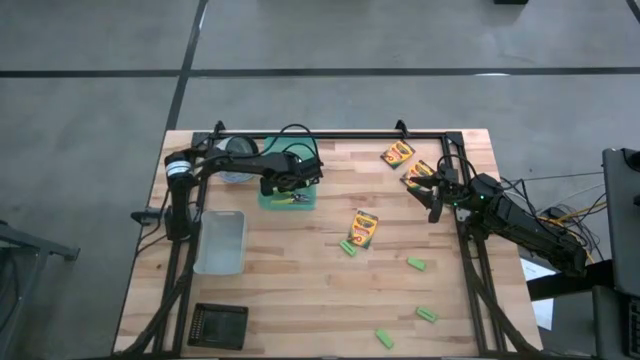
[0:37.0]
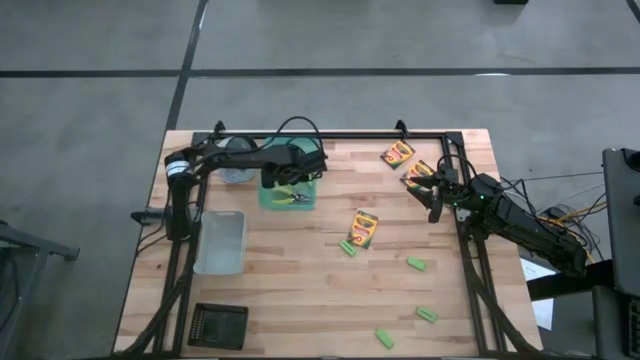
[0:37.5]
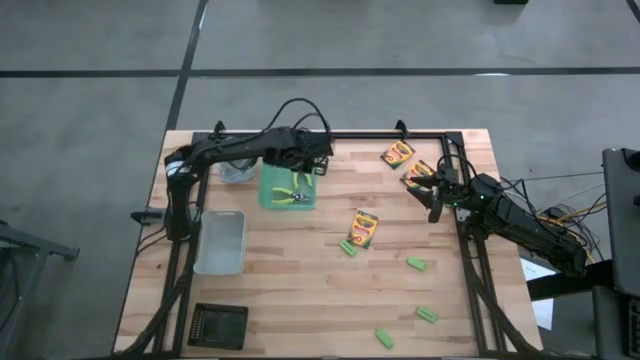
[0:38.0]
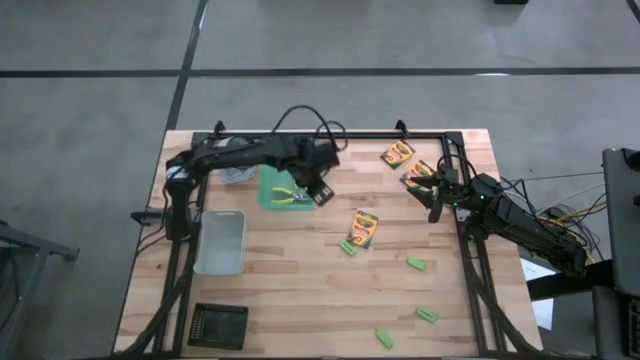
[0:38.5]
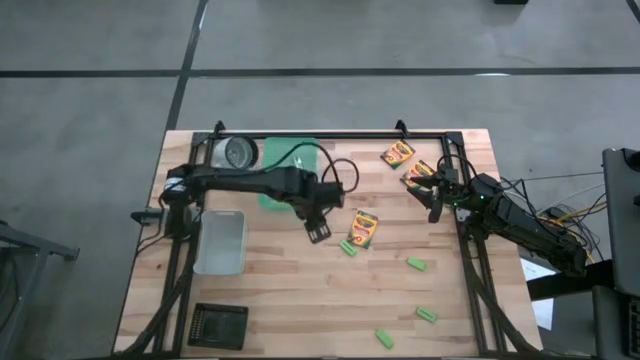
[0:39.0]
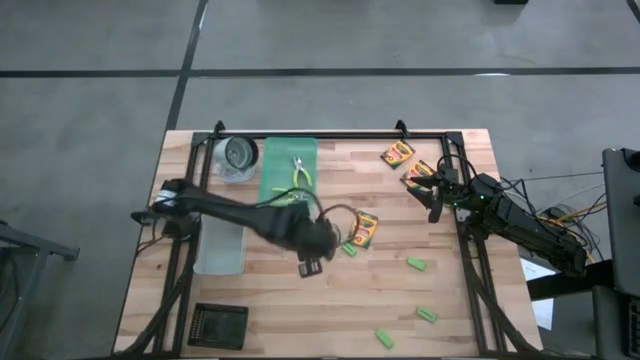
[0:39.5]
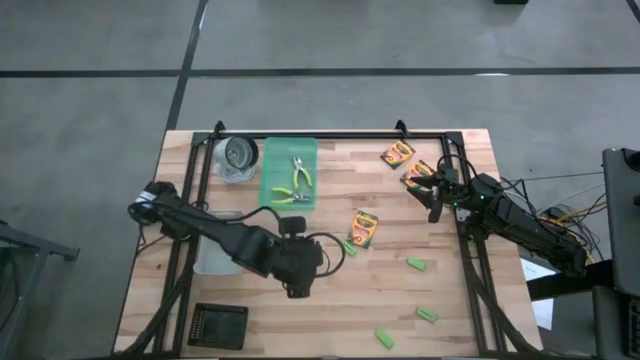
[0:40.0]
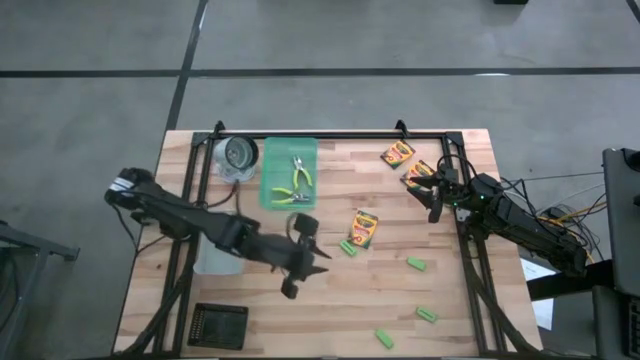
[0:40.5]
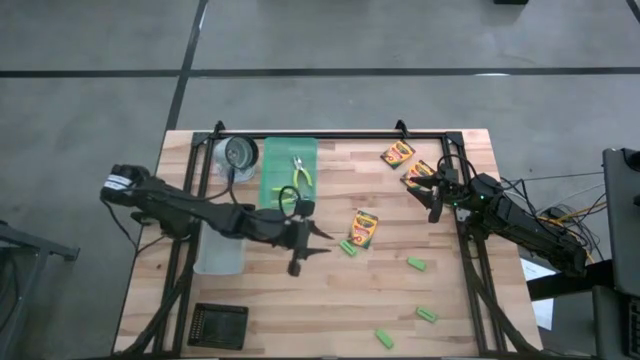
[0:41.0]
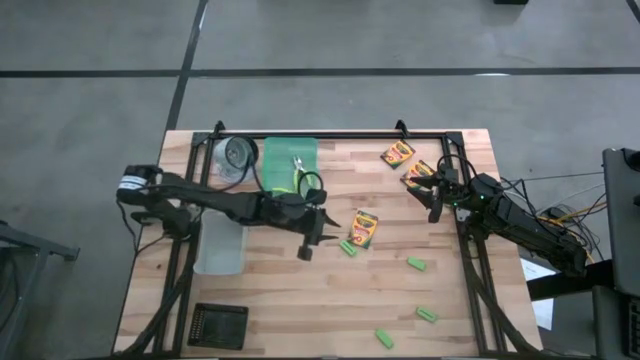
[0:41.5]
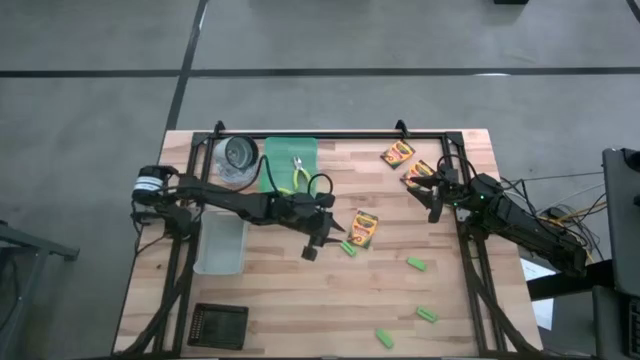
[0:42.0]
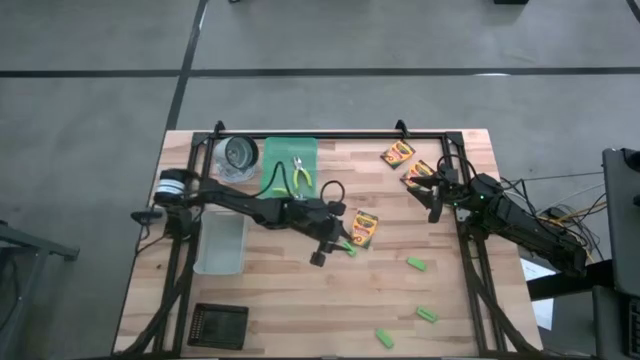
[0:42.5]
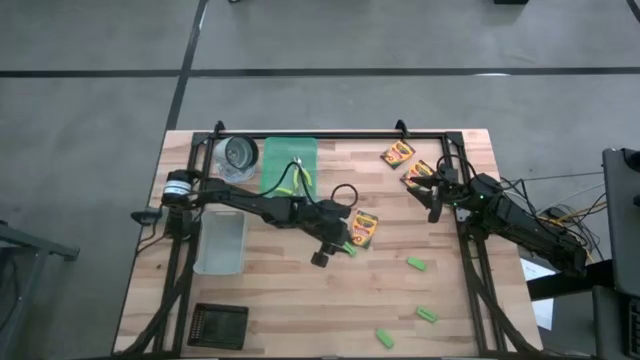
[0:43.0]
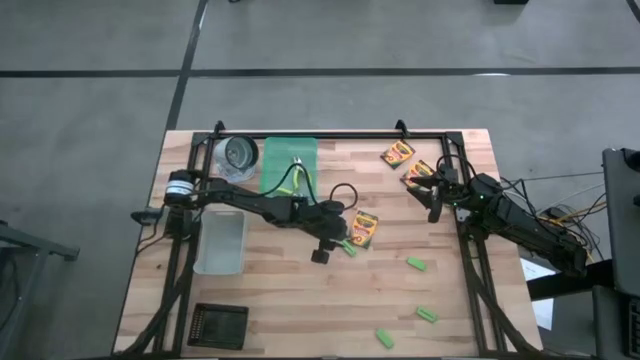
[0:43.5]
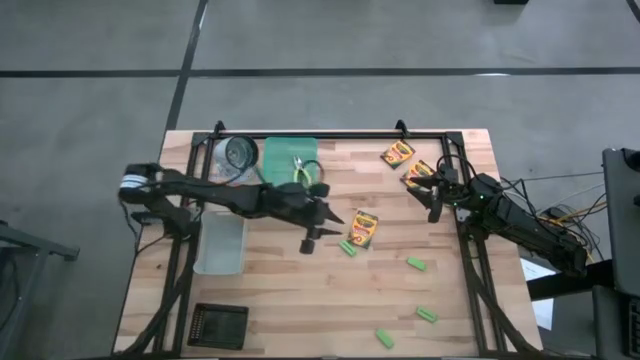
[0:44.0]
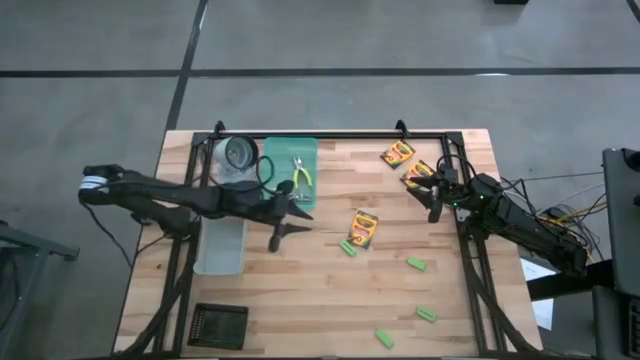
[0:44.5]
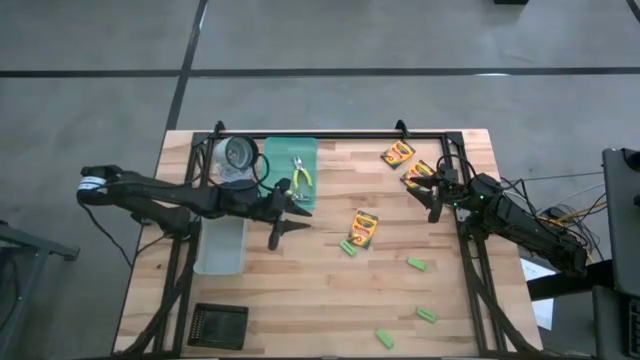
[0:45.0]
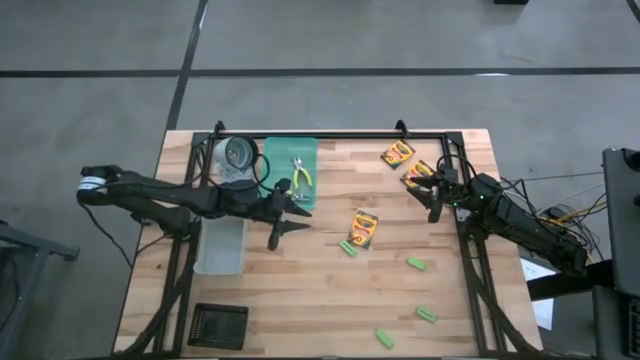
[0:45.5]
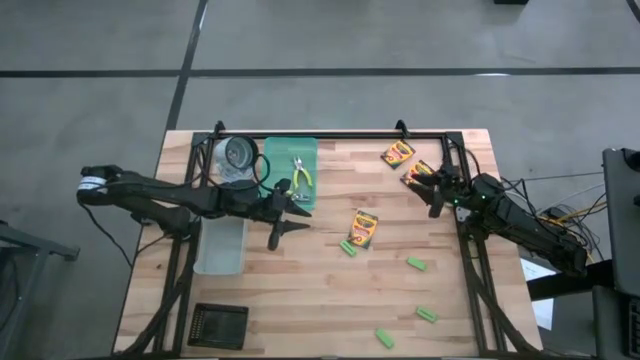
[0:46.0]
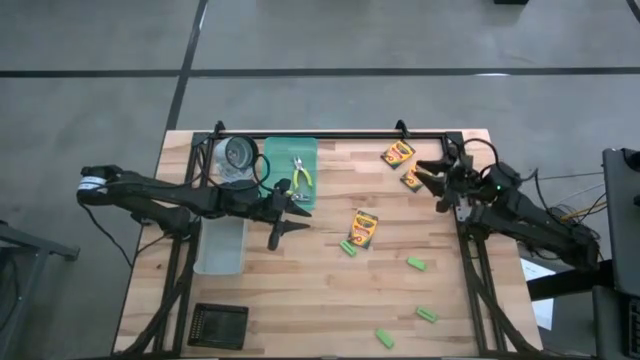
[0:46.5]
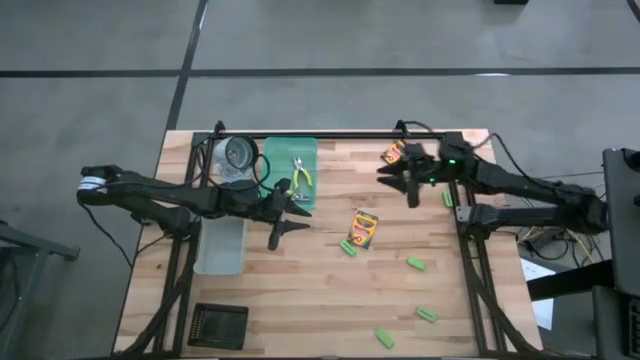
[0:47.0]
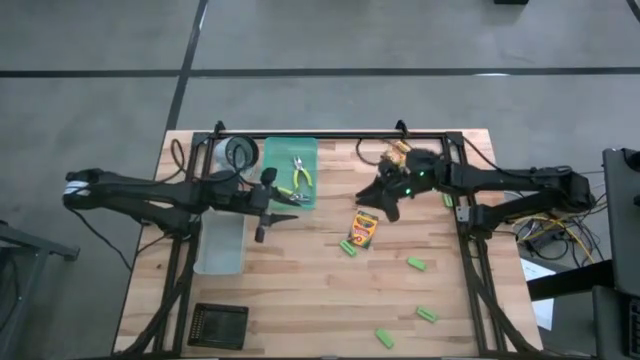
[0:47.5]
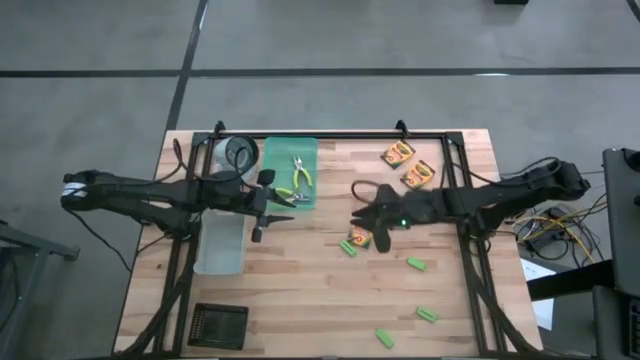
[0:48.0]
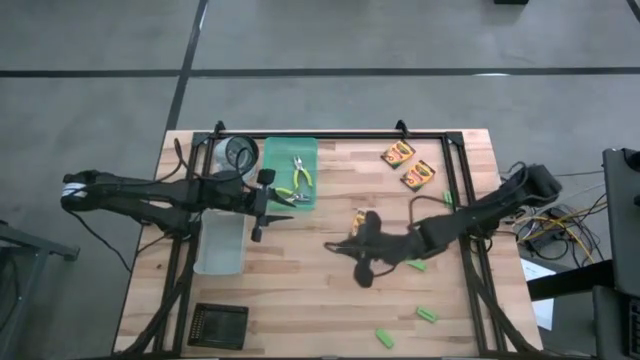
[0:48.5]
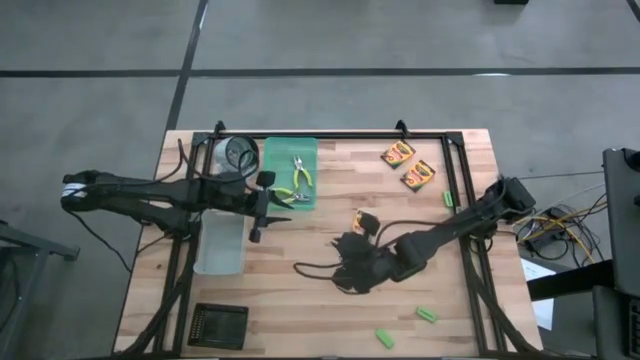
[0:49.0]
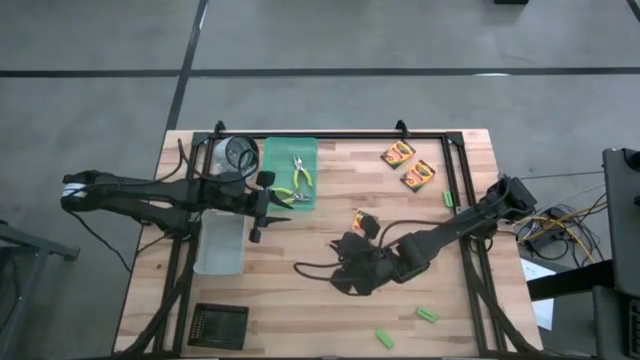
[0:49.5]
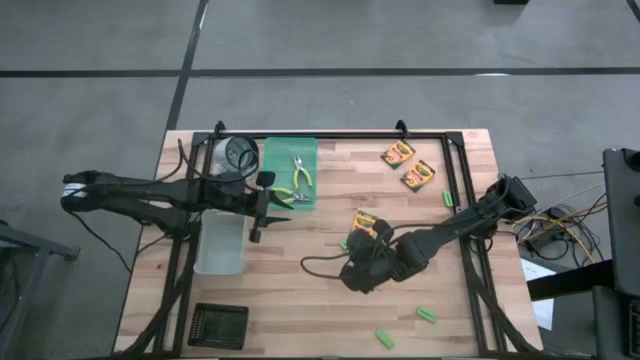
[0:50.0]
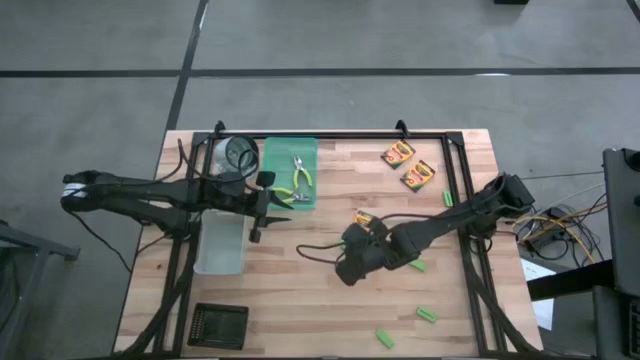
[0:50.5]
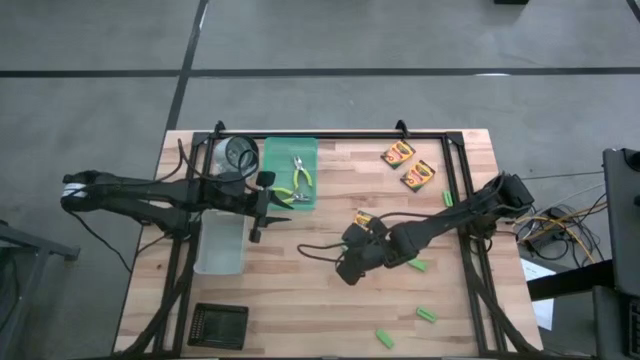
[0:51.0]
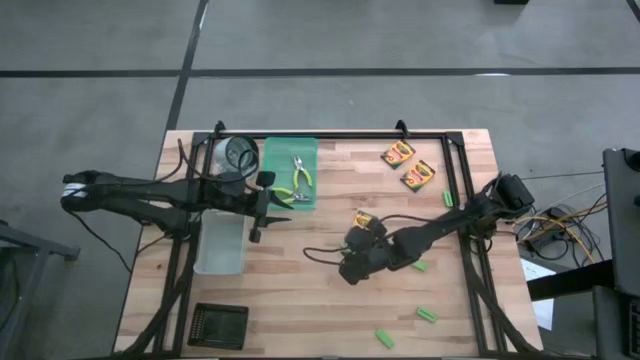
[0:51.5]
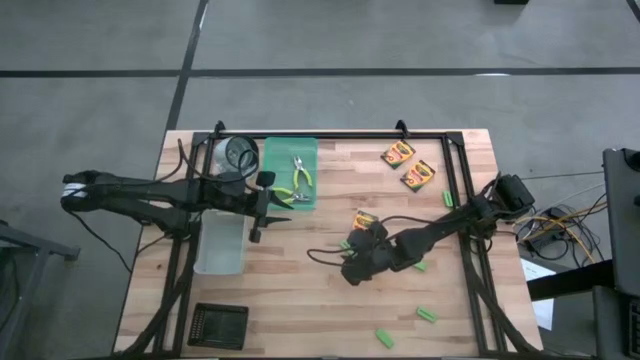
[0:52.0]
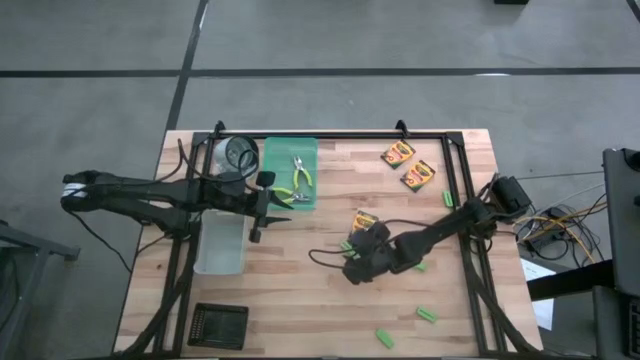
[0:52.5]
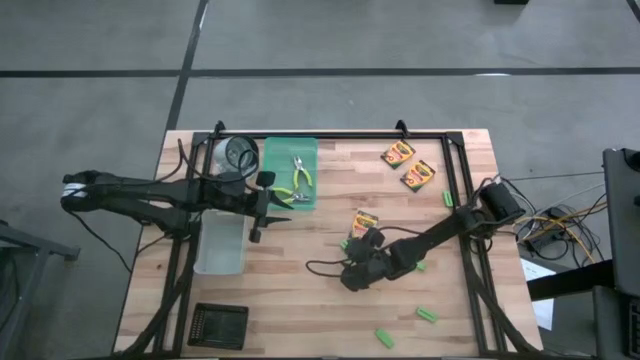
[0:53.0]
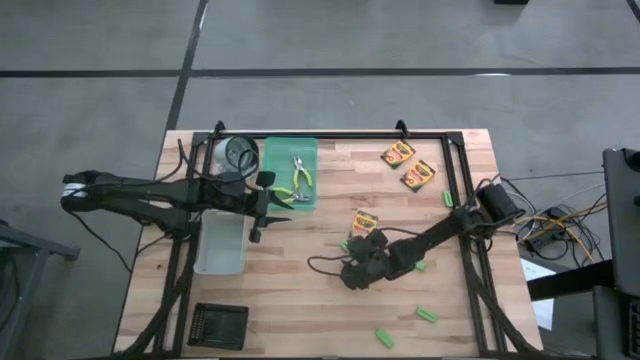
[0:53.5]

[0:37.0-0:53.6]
Task: Pick & Place School Supplies
Put the green eraser into the black bin

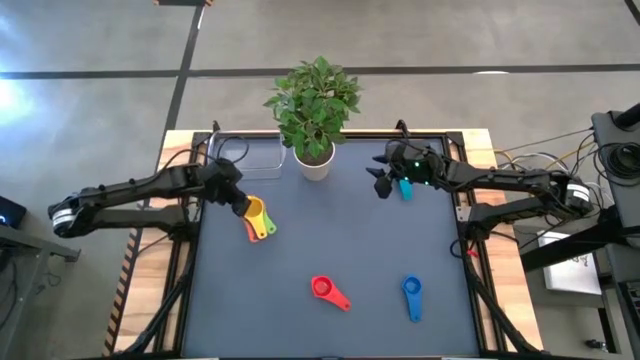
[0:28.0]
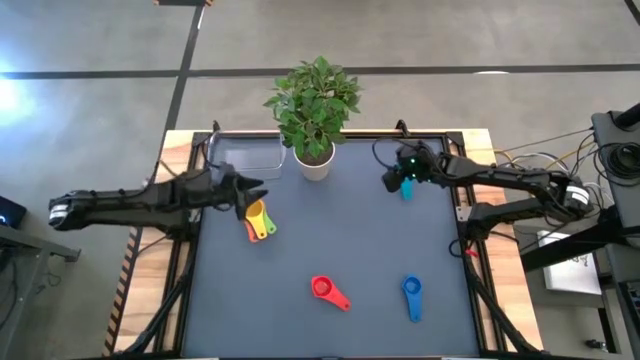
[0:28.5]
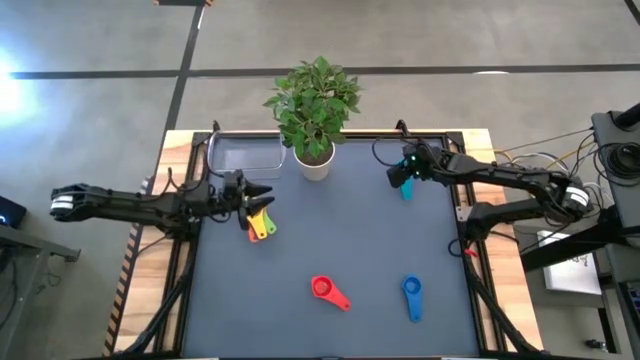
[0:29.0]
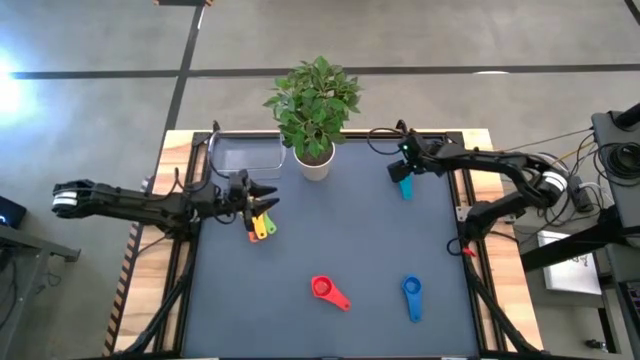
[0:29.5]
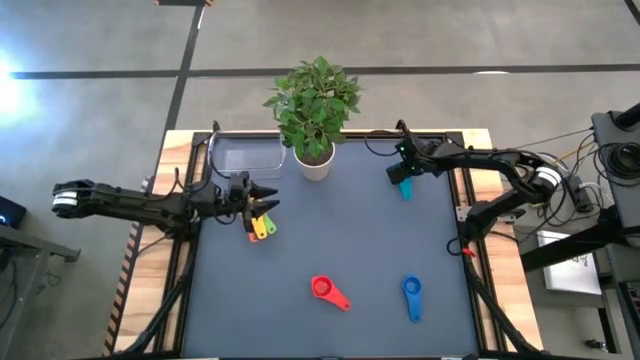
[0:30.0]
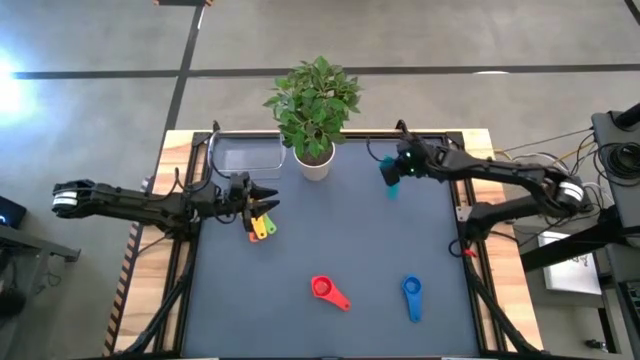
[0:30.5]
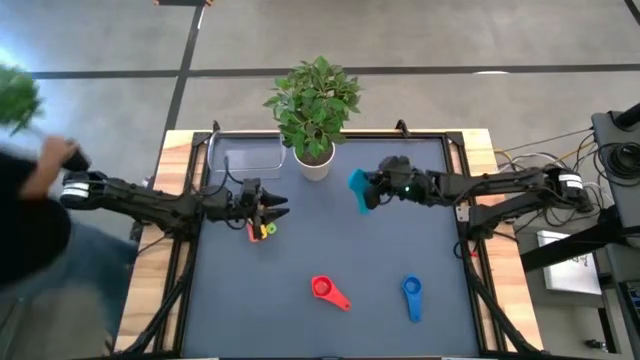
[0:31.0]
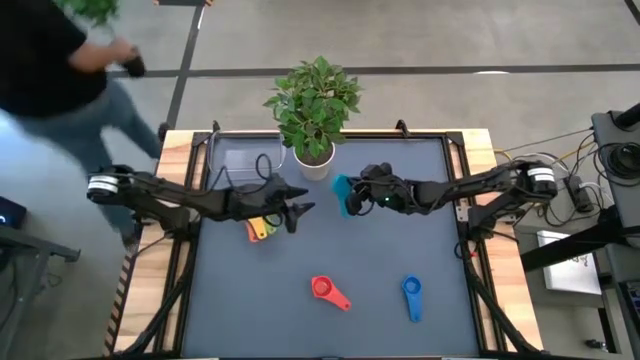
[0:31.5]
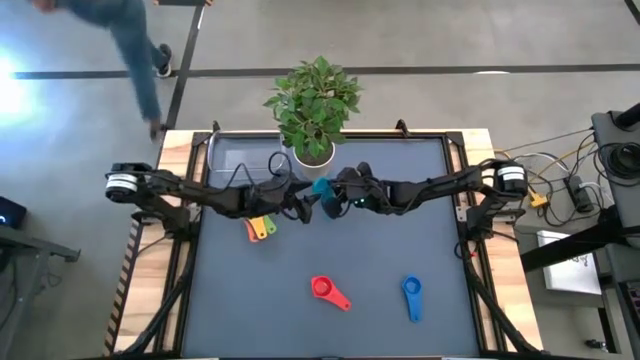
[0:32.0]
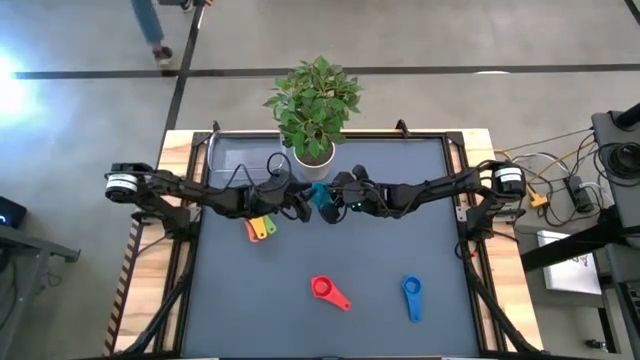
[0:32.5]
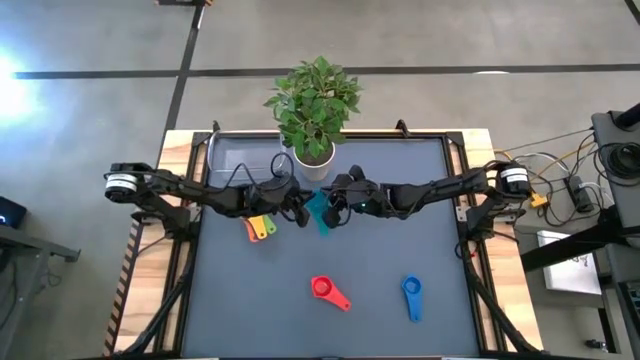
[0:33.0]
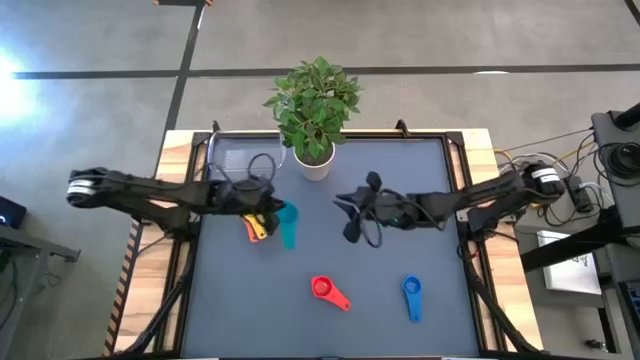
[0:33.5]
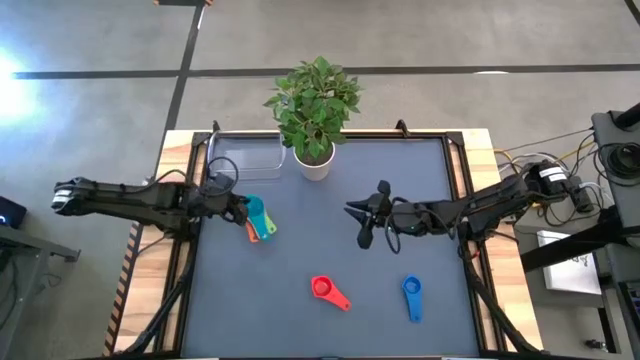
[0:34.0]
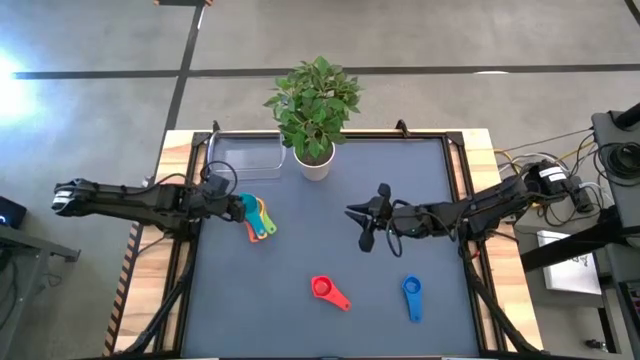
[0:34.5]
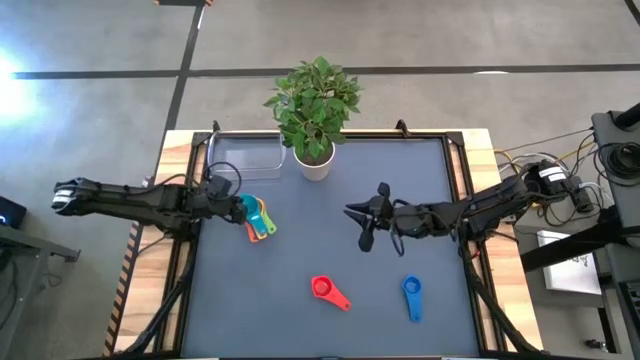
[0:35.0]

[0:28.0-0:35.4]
Task: Nest measuring cups in basket
Stack the light blue measuring cup on top of the yellow measuring cup
